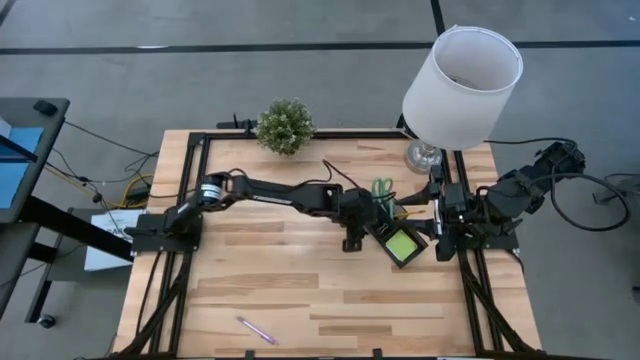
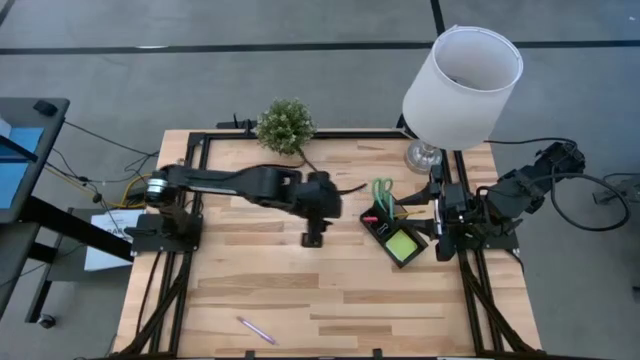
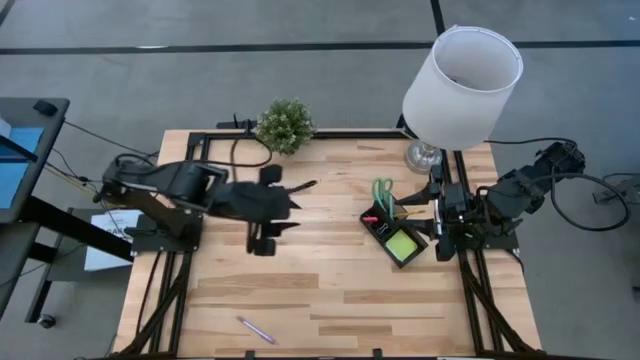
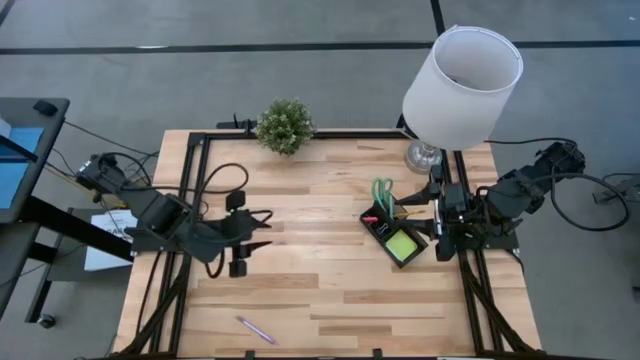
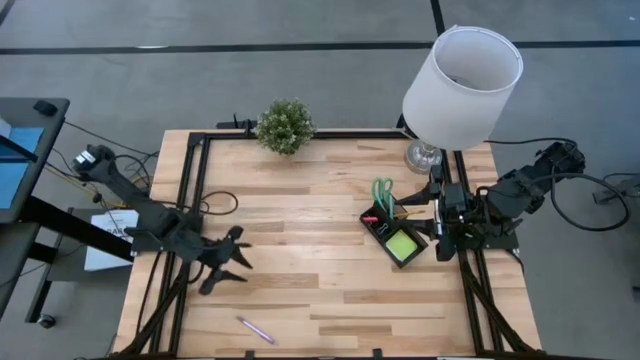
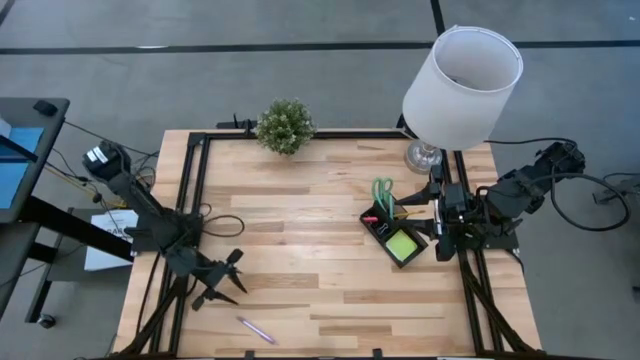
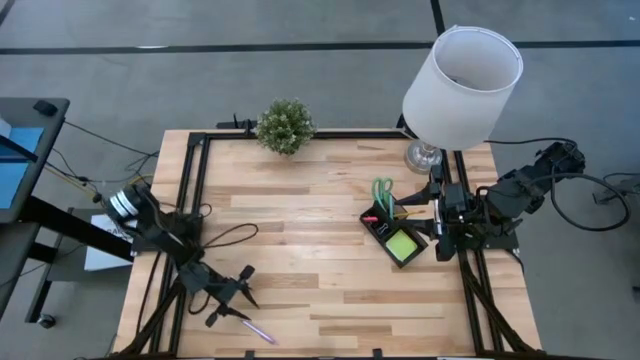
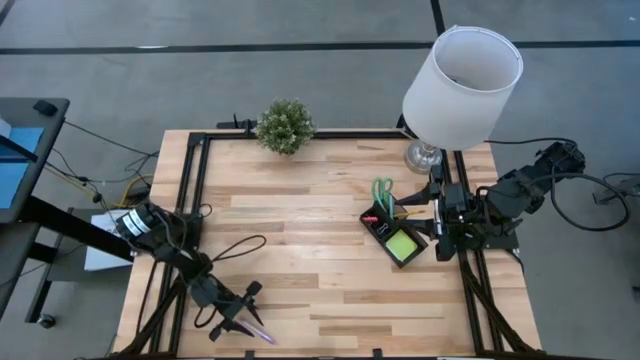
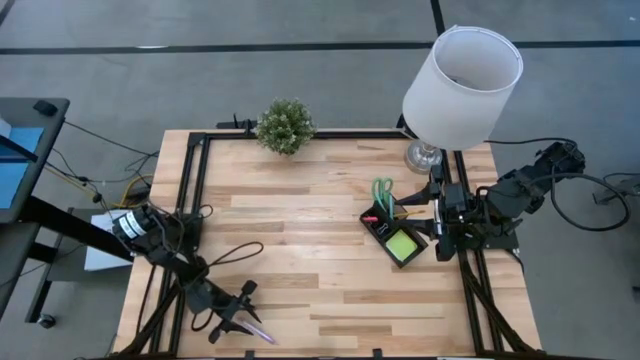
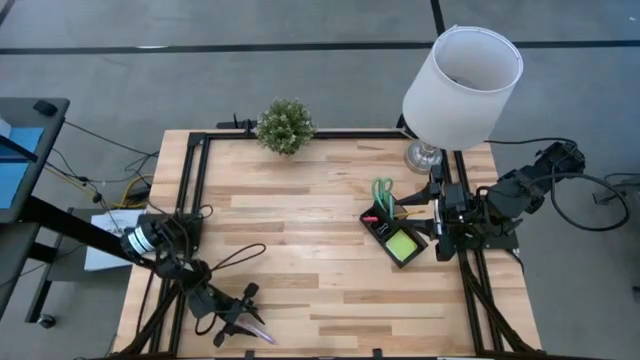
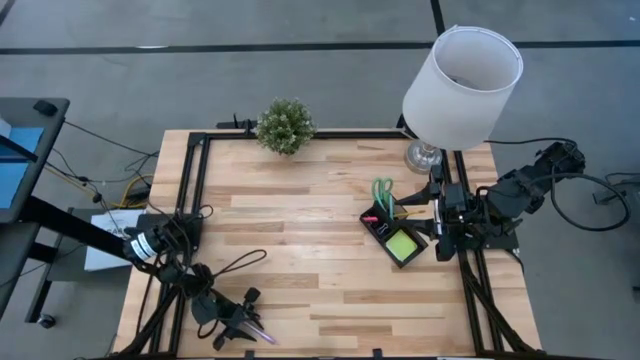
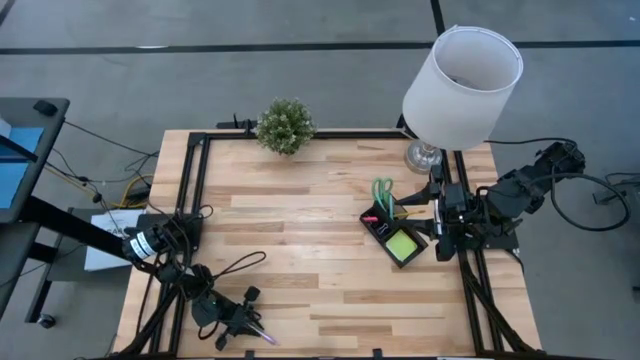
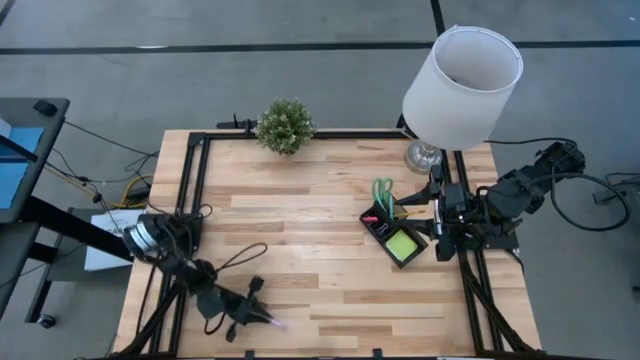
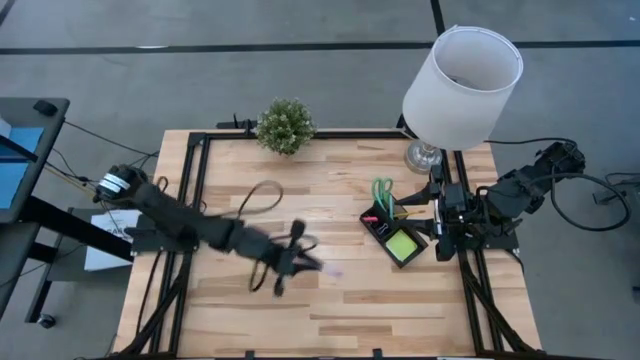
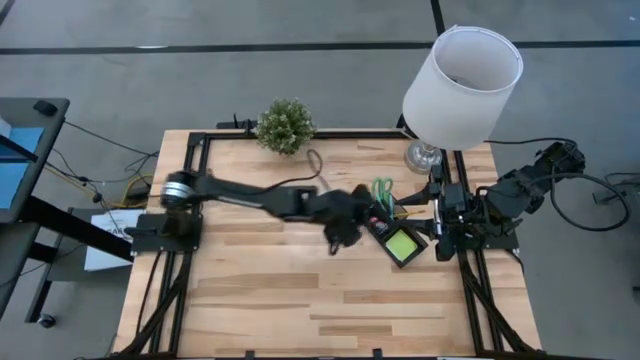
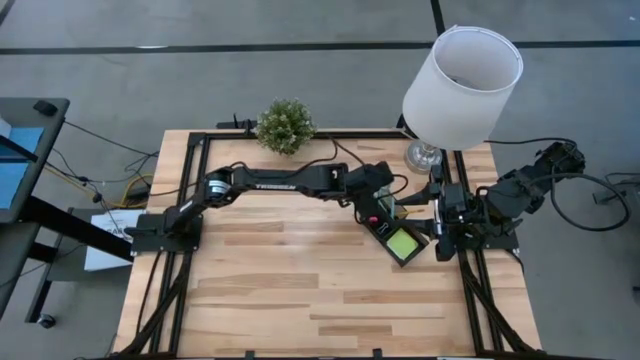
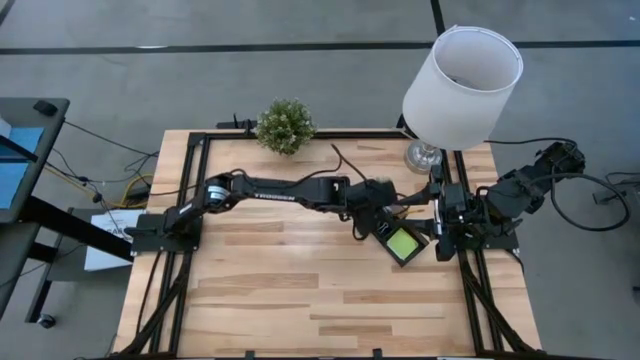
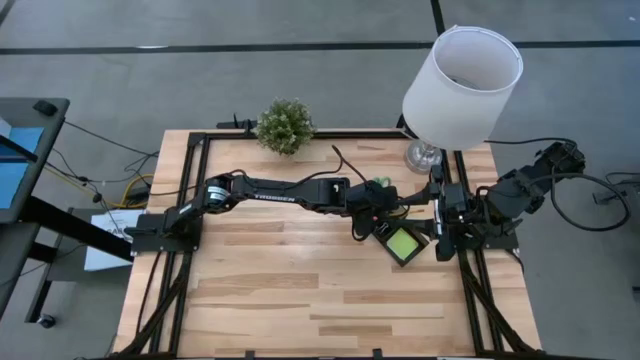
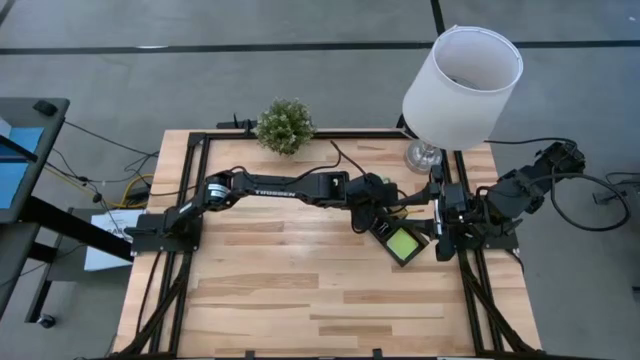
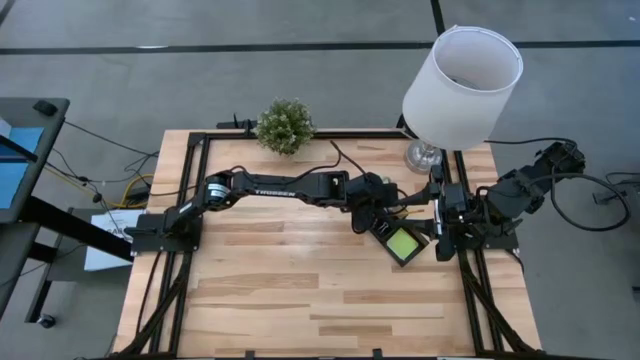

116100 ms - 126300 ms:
Task: Pick and place office supplies into organizer
Put the purple pen into the black desk organizer

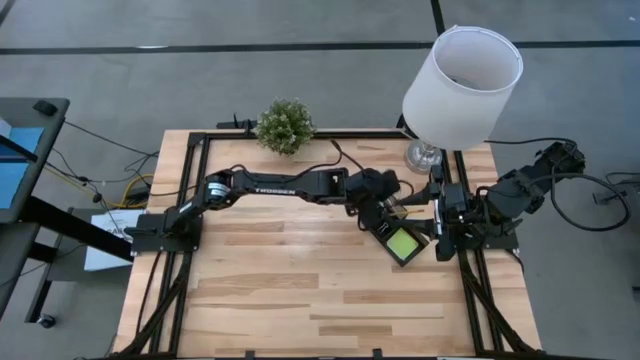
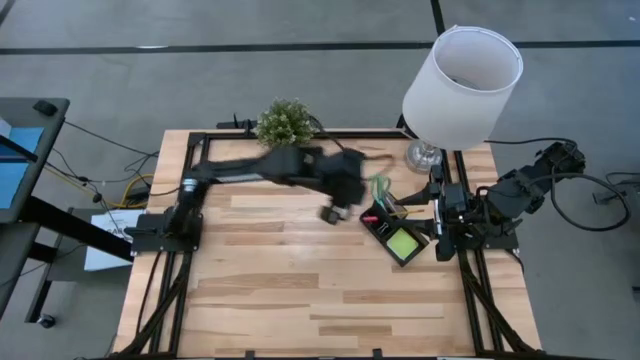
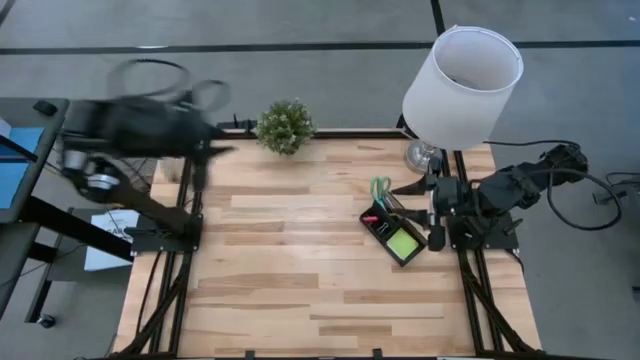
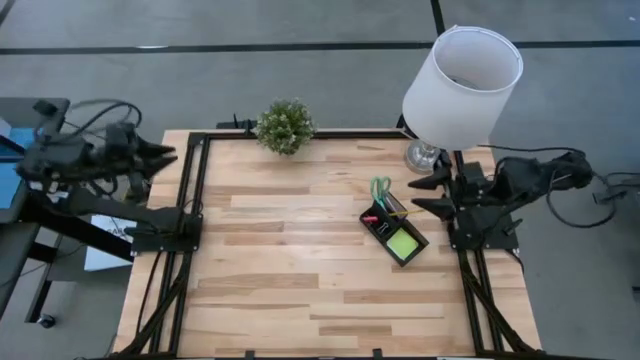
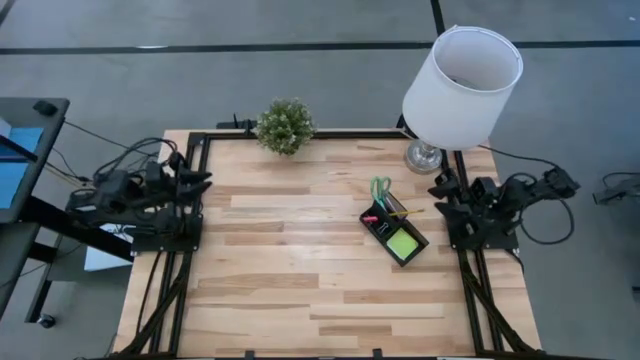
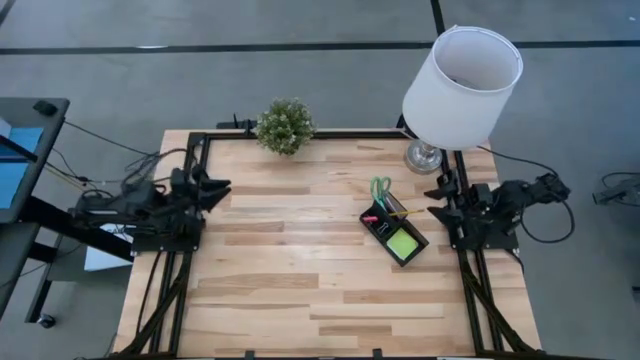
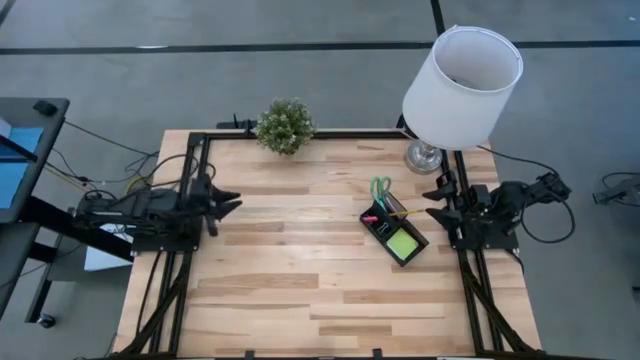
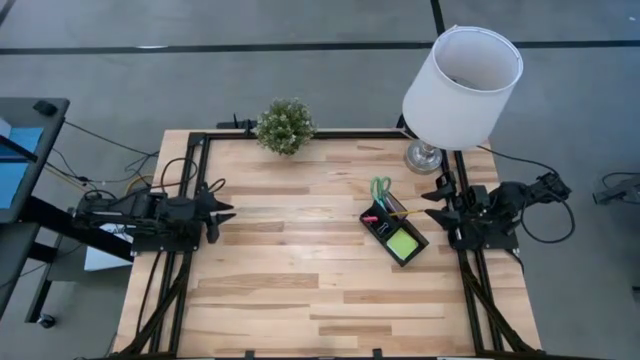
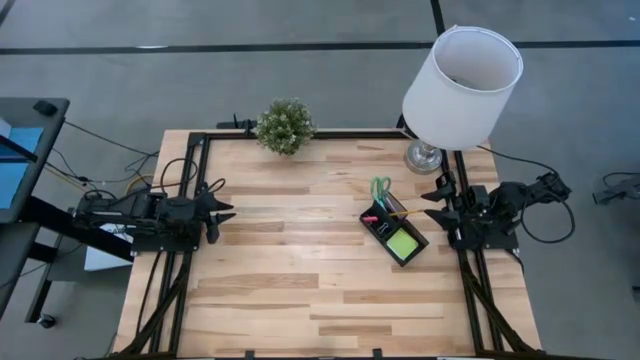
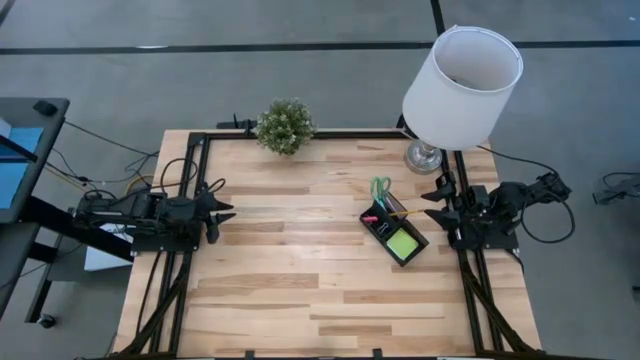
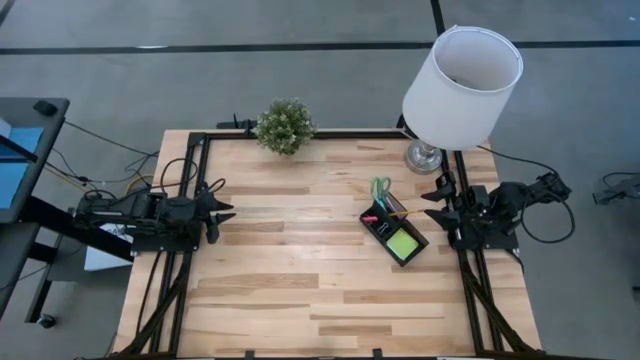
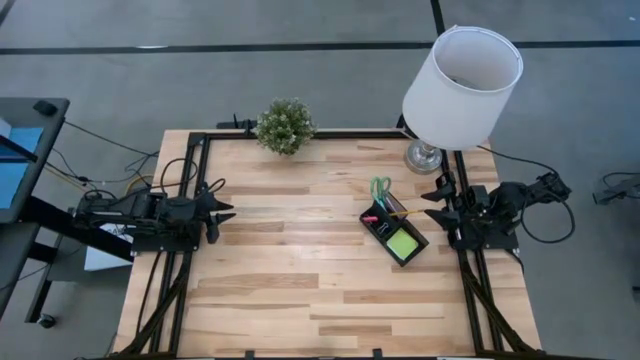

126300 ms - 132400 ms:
Return to Home Position

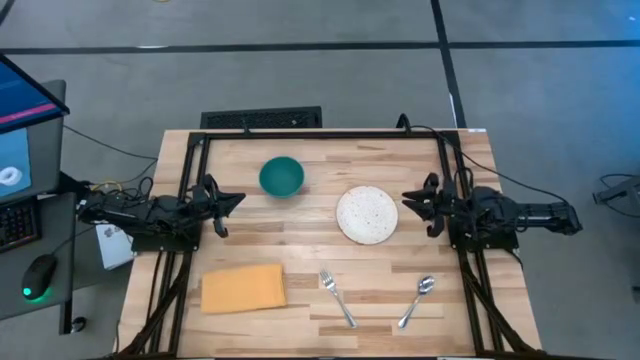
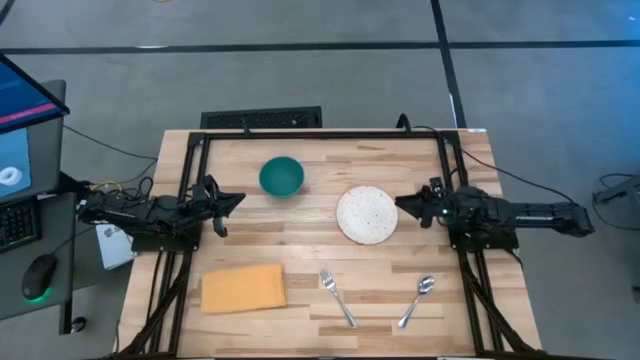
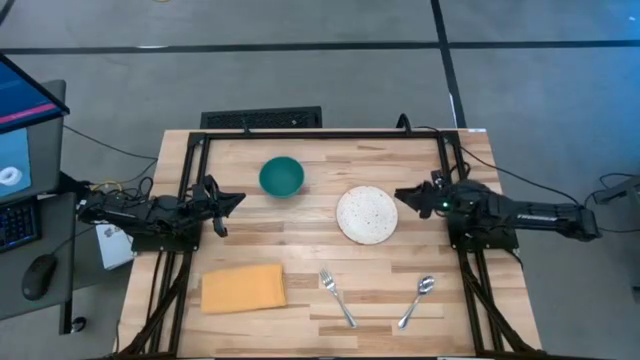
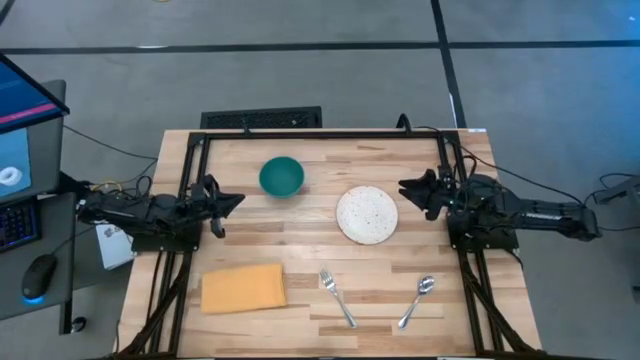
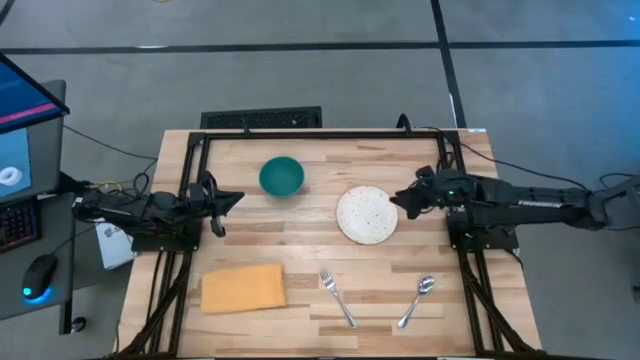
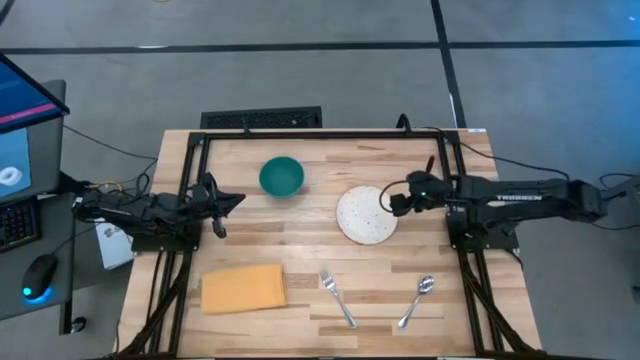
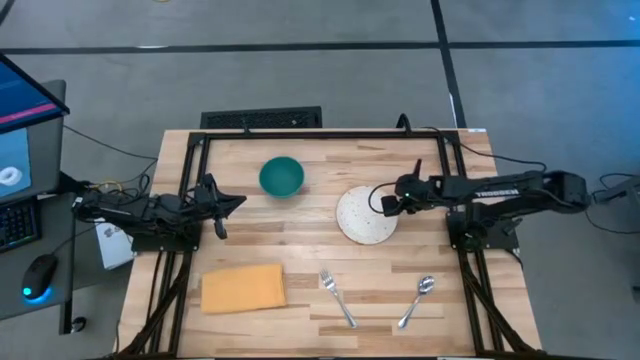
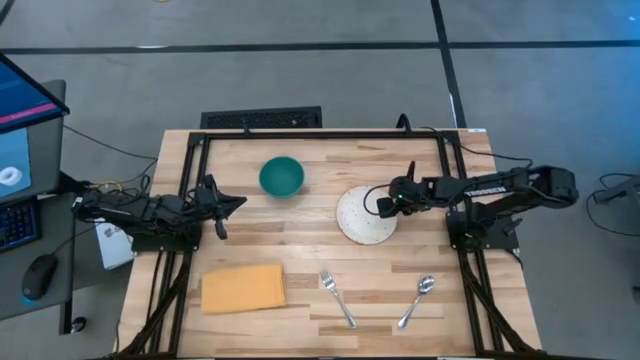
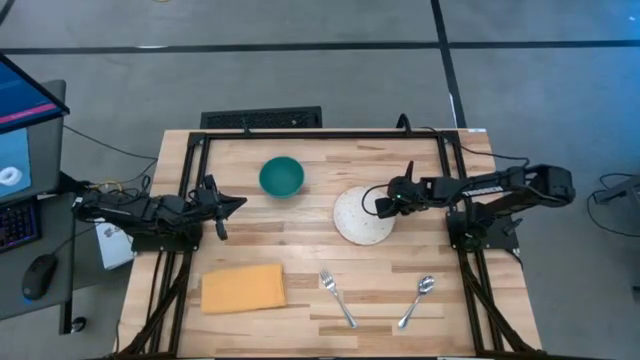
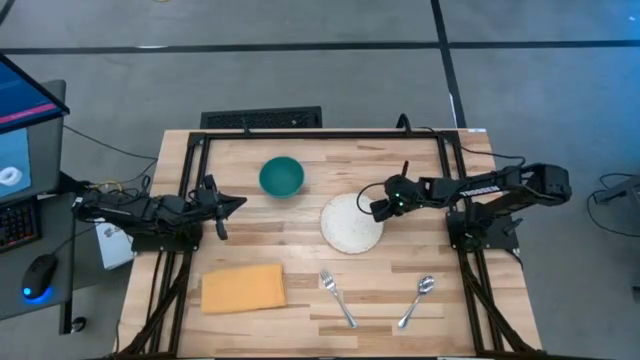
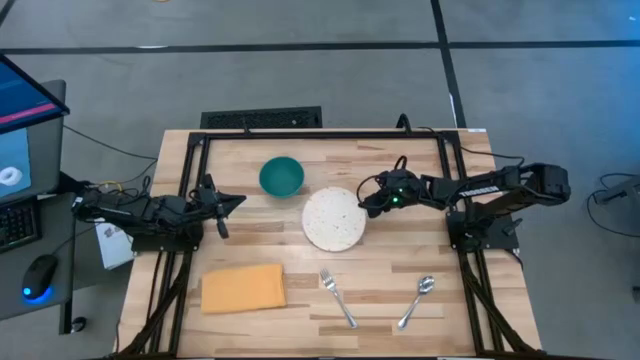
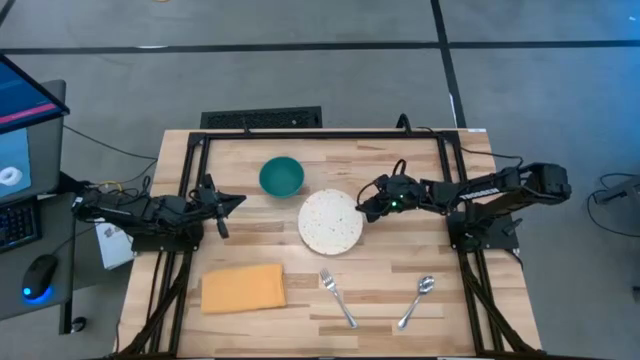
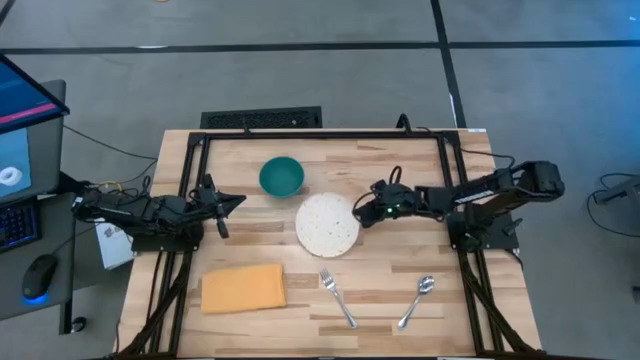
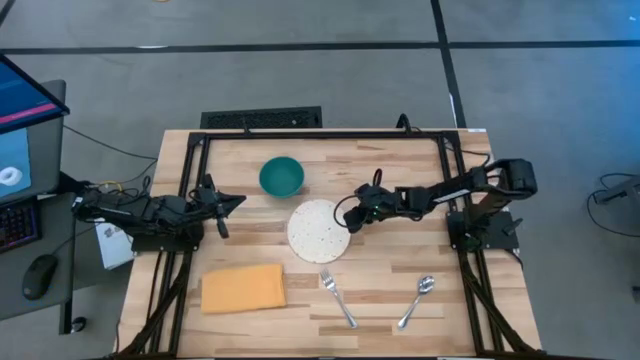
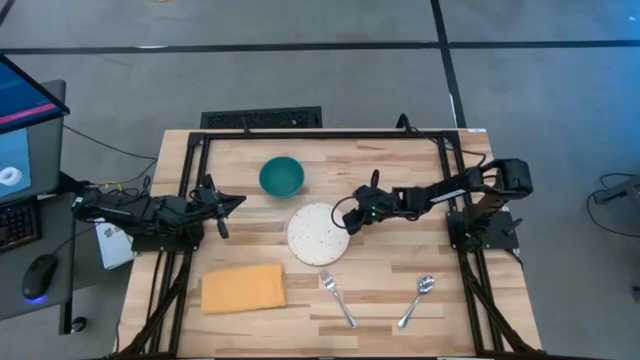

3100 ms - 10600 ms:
Task: Set table place
Move the plate from middle right to center of the table
